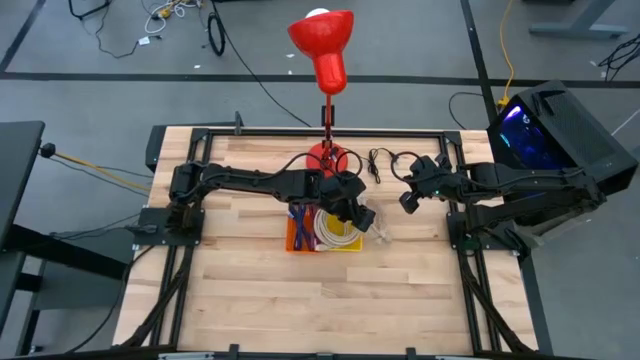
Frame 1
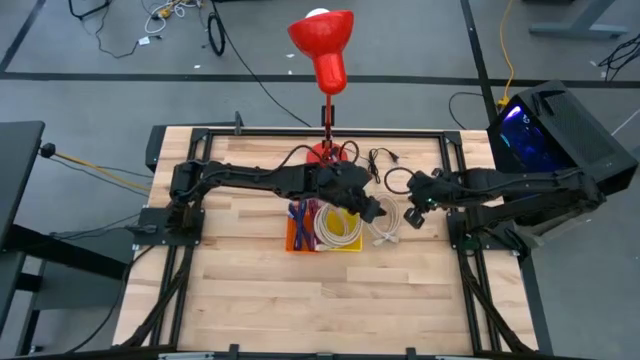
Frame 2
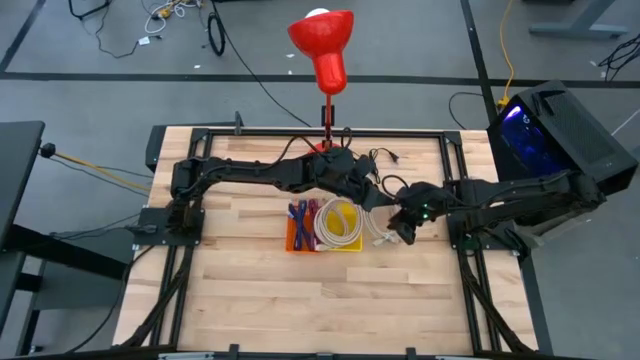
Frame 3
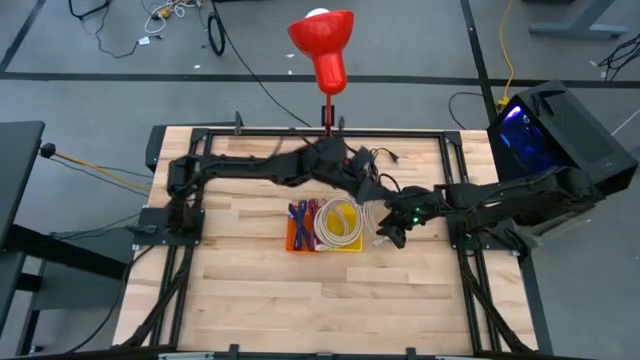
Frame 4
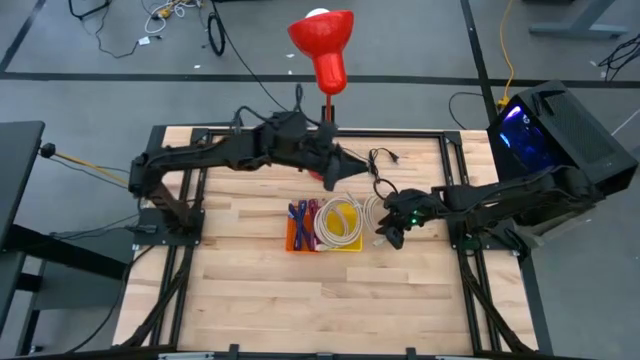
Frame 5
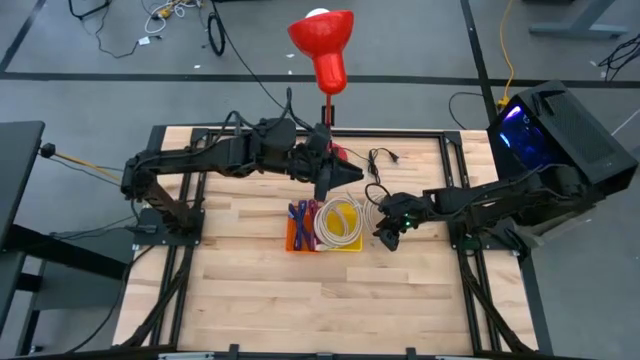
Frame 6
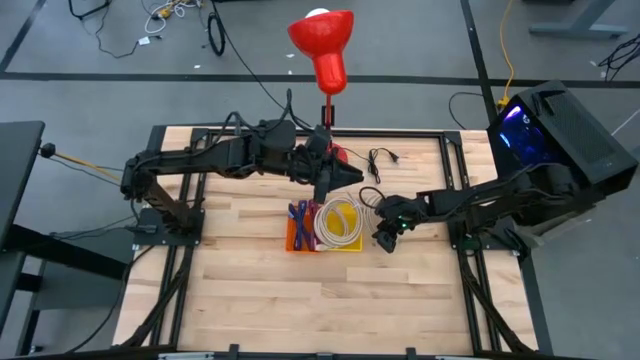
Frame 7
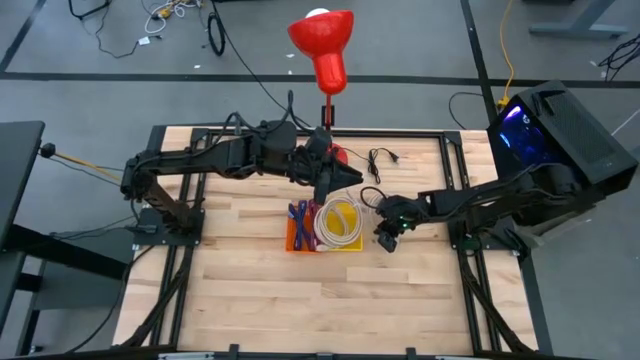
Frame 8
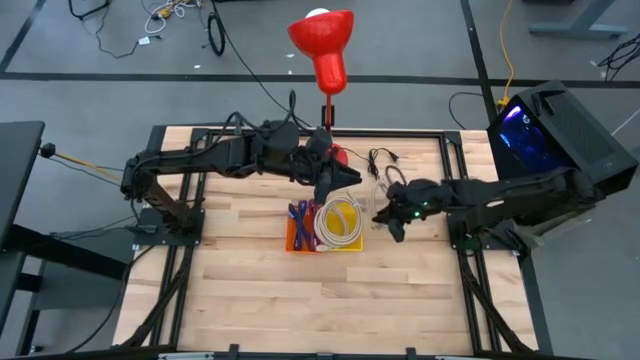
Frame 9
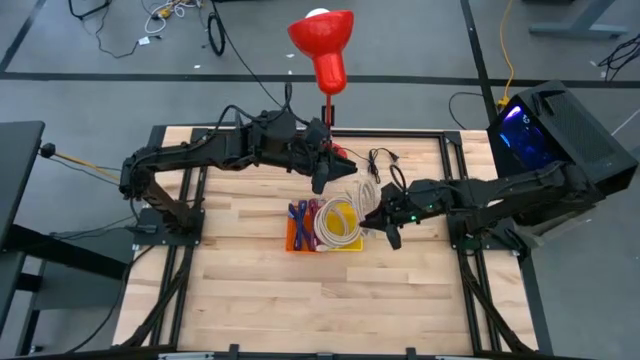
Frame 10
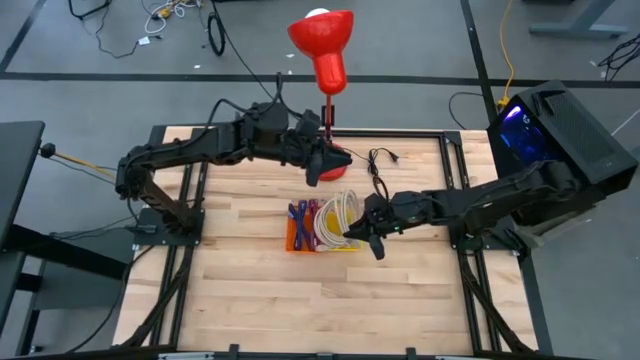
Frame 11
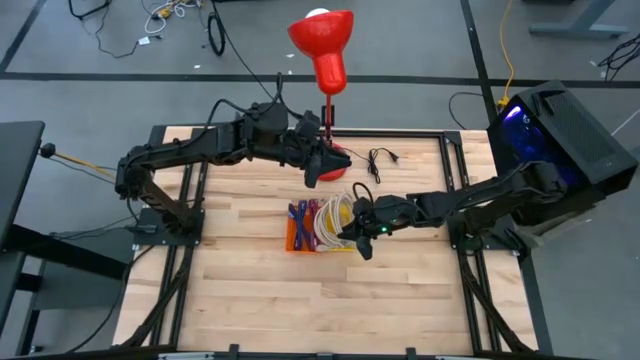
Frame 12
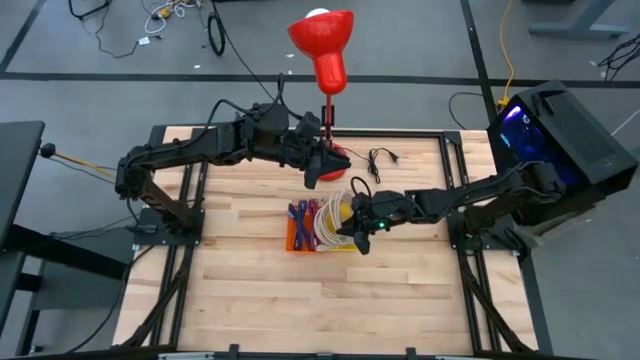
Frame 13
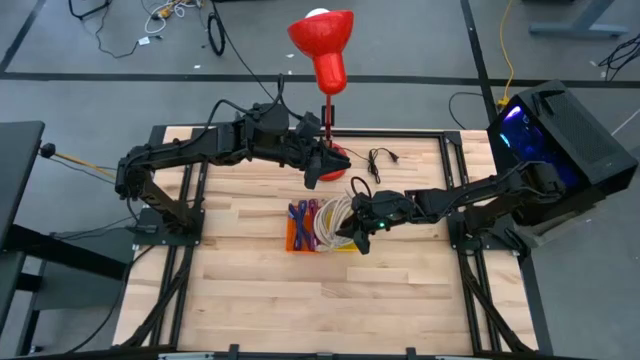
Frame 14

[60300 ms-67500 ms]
Task: Pick & Place USB Port
Put the brown HDMI cable into the yellow bin

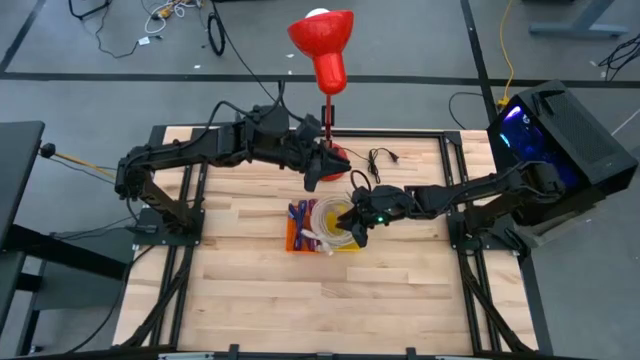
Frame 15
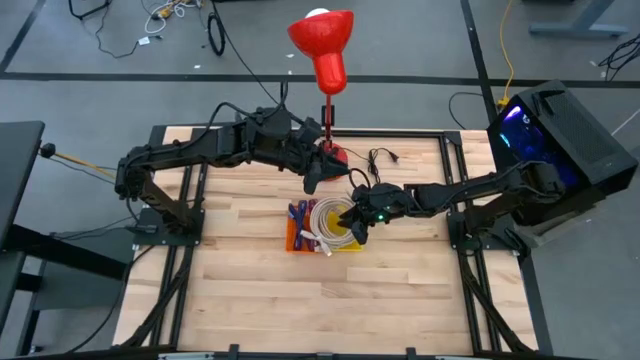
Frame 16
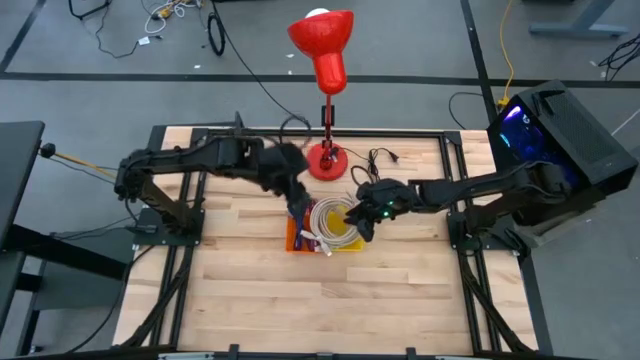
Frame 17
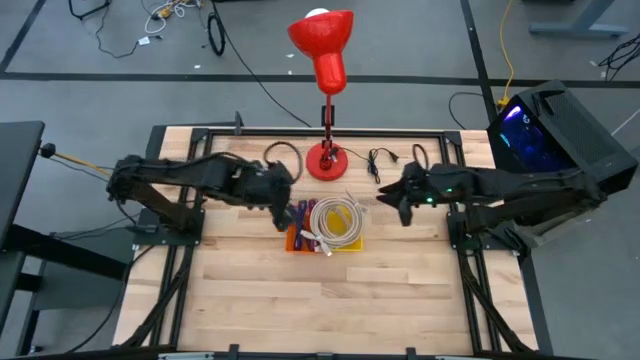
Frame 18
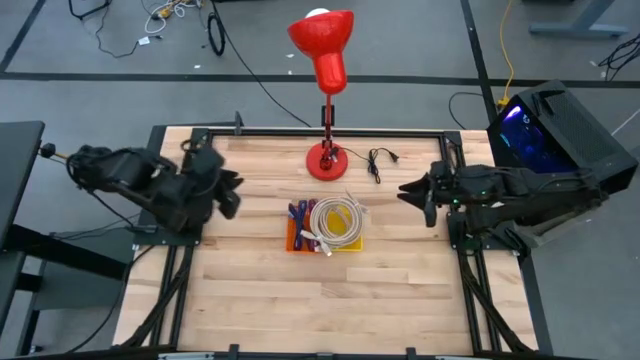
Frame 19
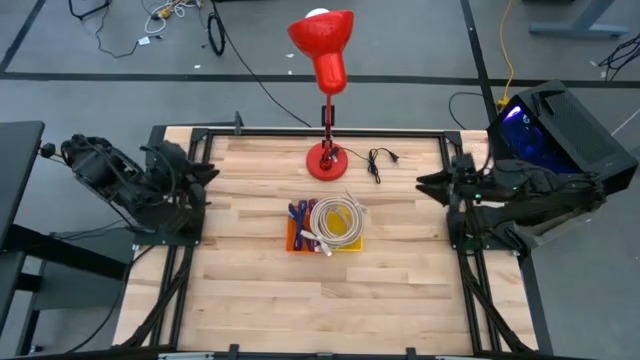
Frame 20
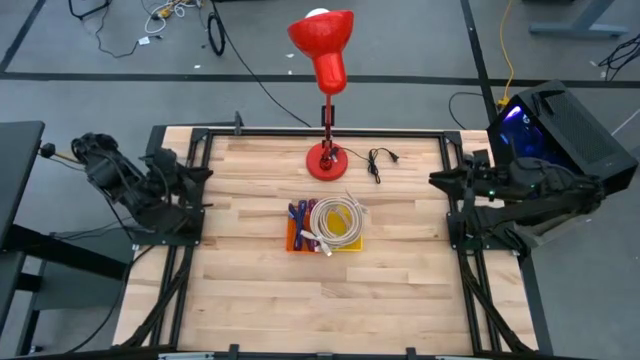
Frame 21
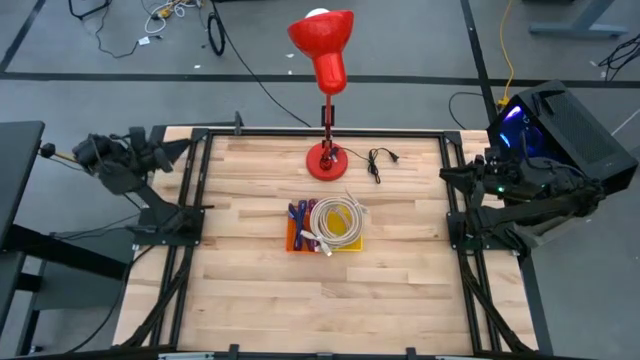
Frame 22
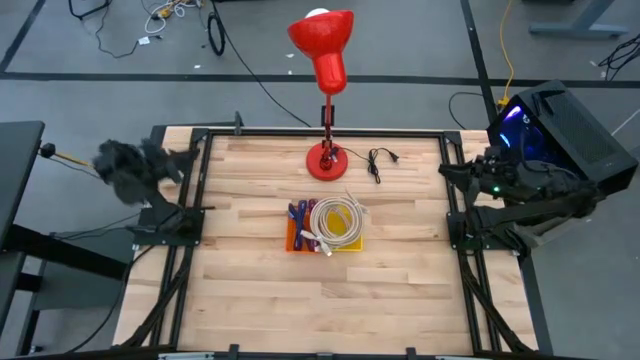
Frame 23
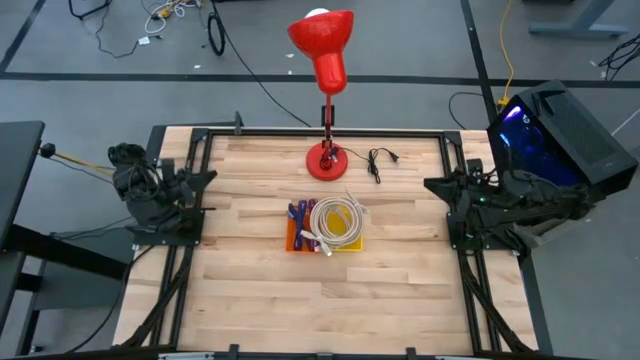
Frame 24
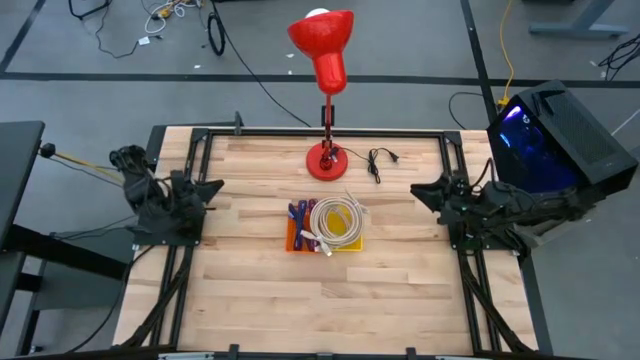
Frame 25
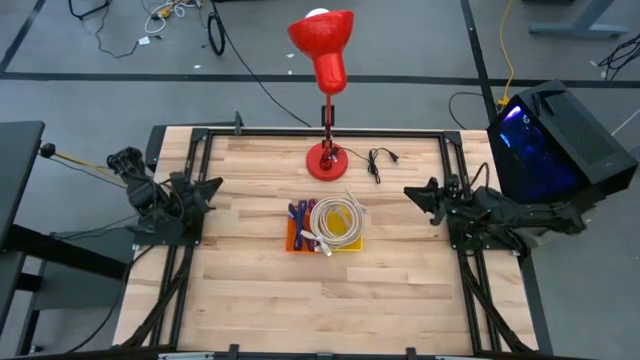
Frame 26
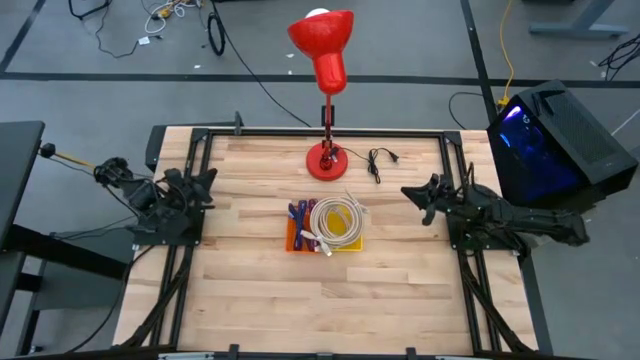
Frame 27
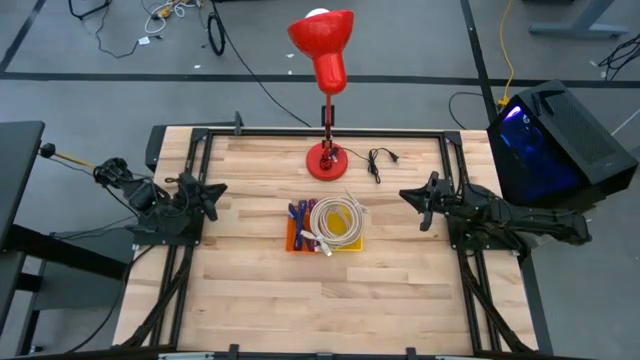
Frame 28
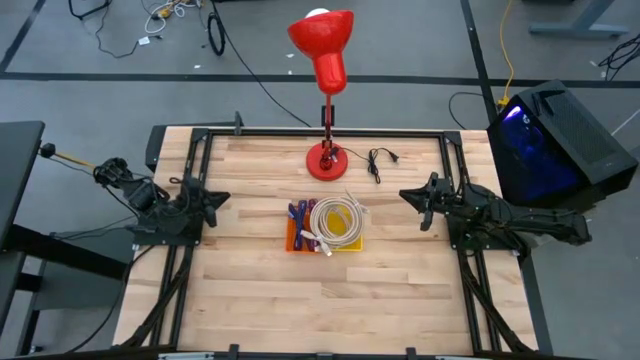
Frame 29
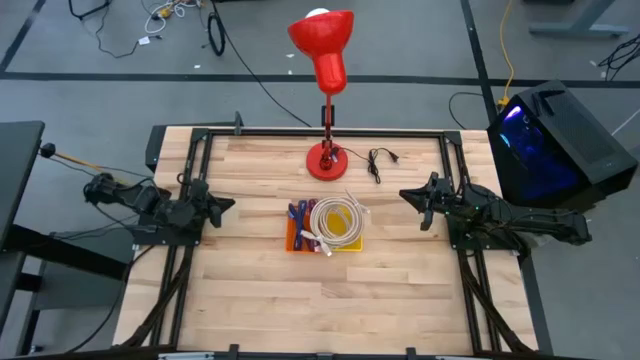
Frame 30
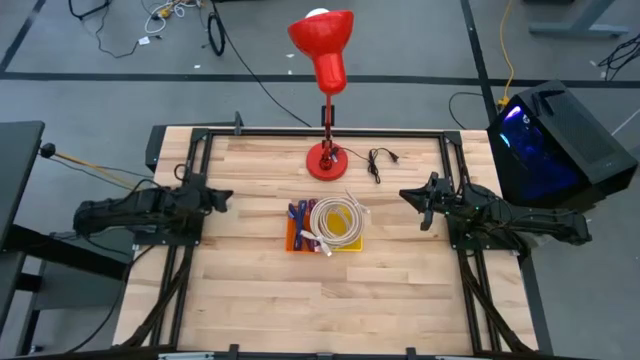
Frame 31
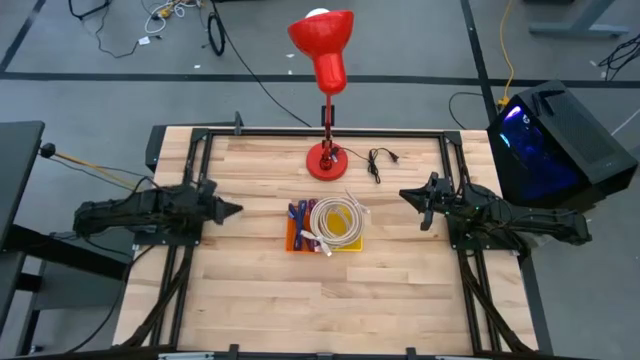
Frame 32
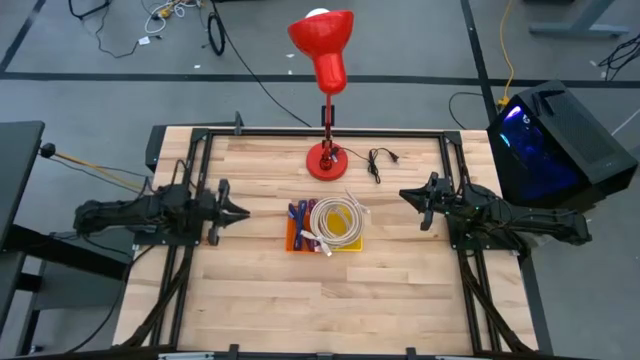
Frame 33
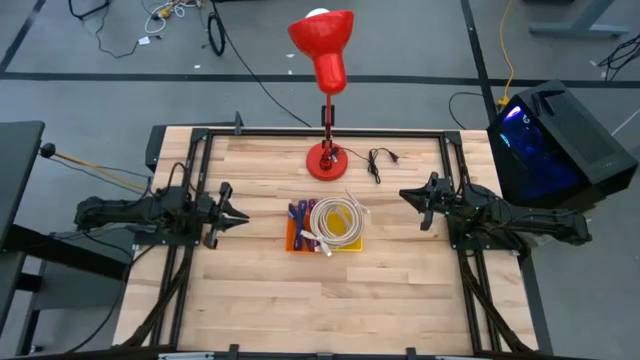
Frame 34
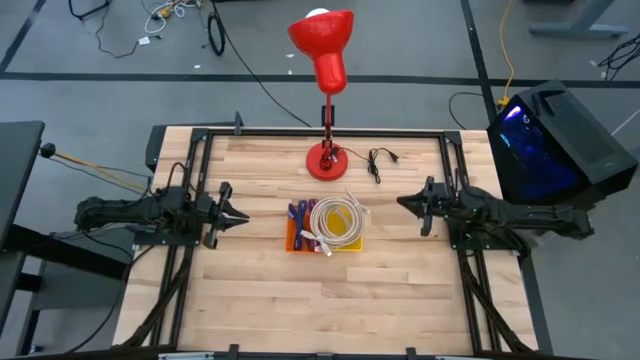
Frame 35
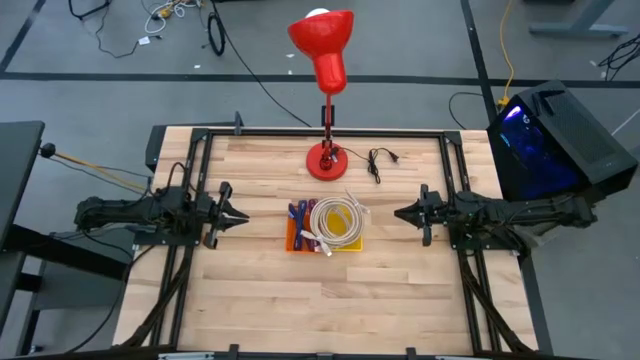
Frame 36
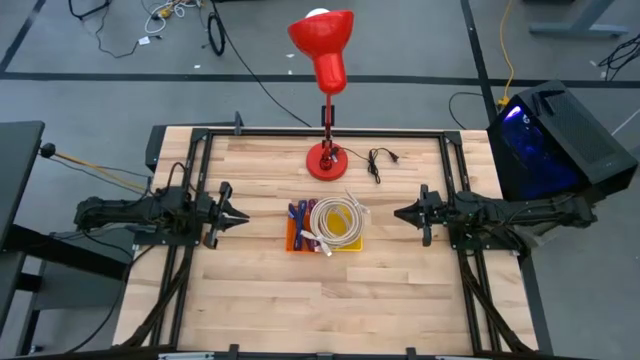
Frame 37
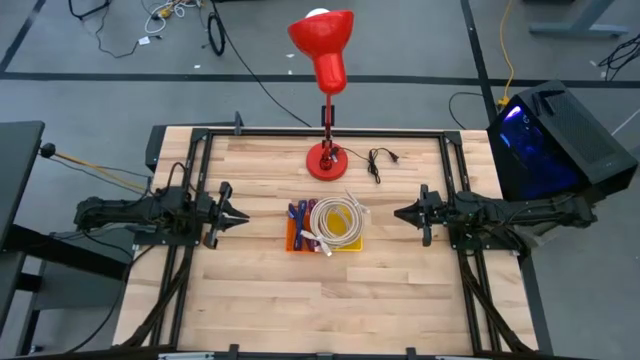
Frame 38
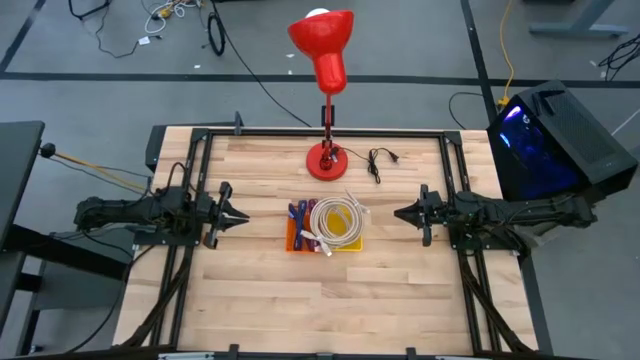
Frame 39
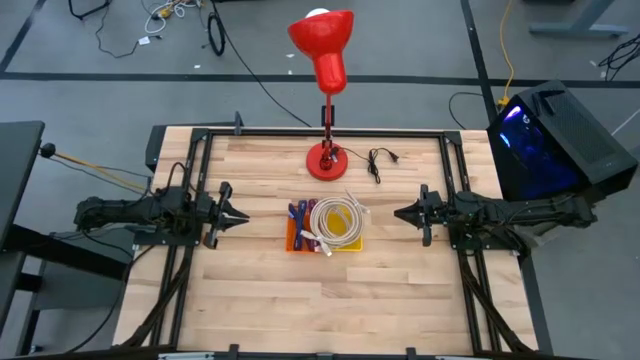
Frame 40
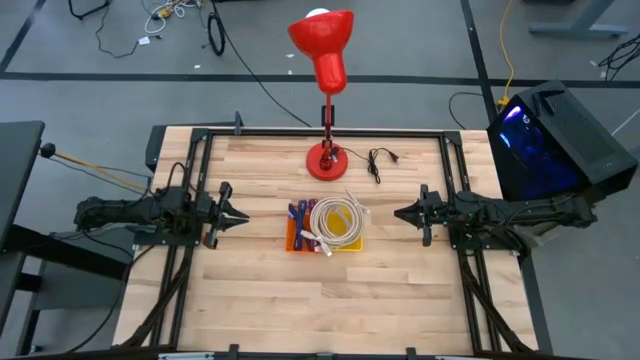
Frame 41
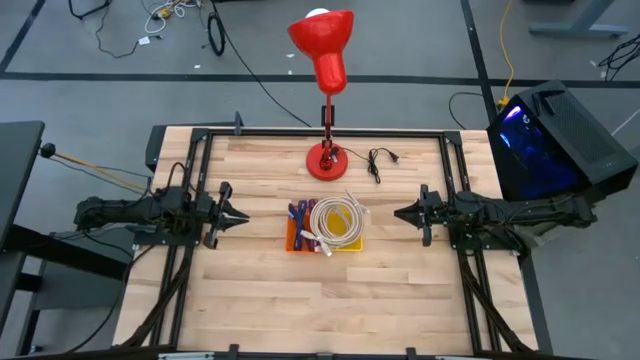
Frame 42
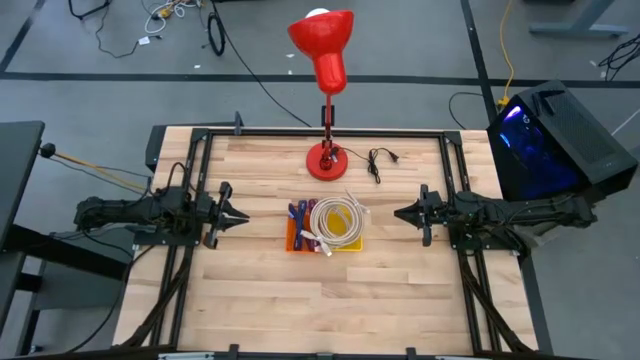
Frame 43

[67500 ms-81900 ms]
Return to Home Position
